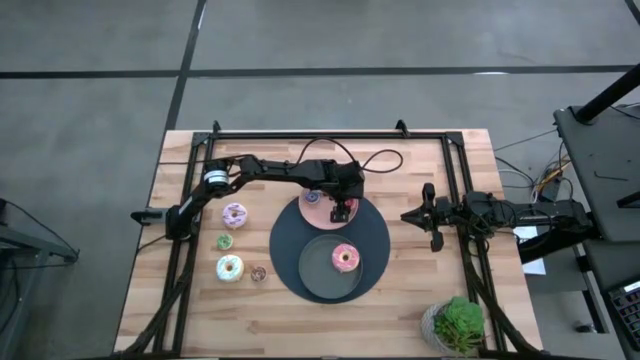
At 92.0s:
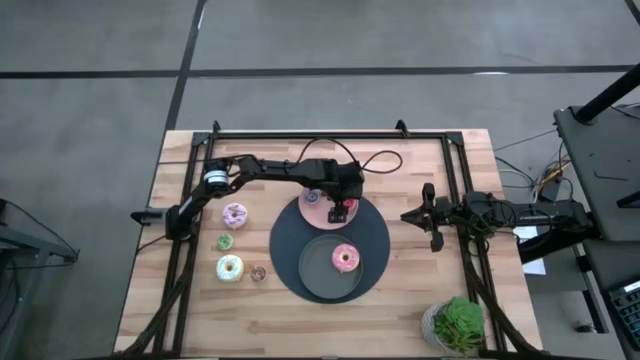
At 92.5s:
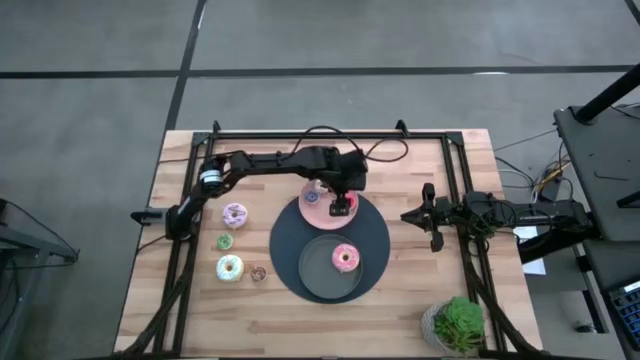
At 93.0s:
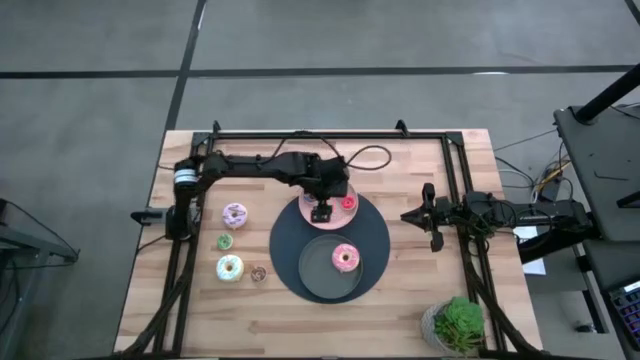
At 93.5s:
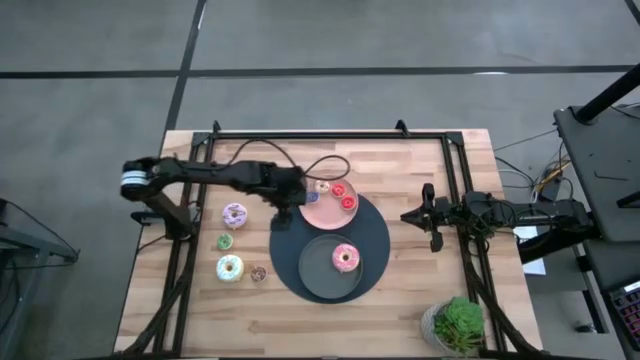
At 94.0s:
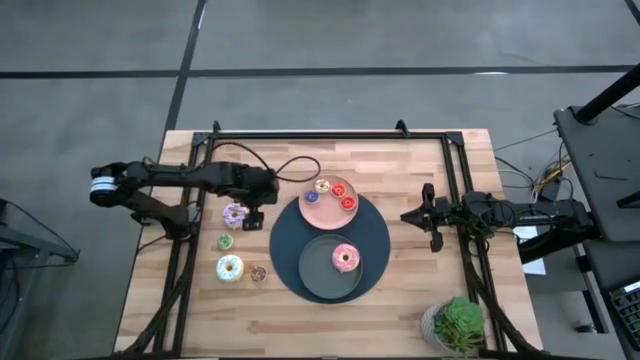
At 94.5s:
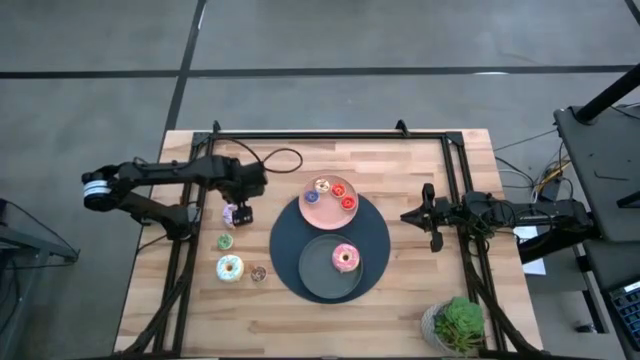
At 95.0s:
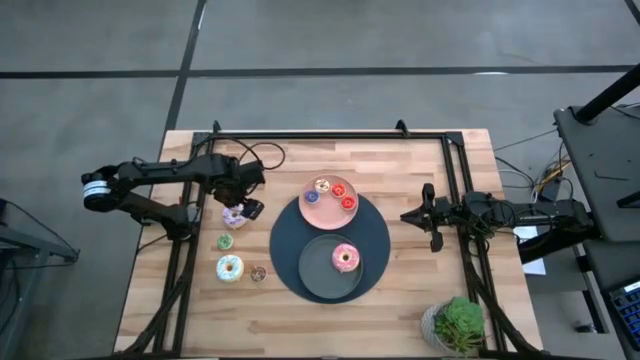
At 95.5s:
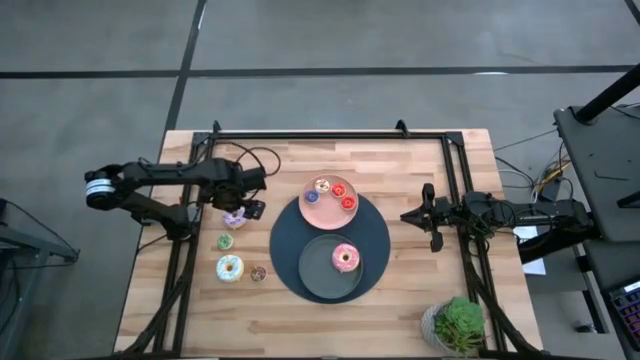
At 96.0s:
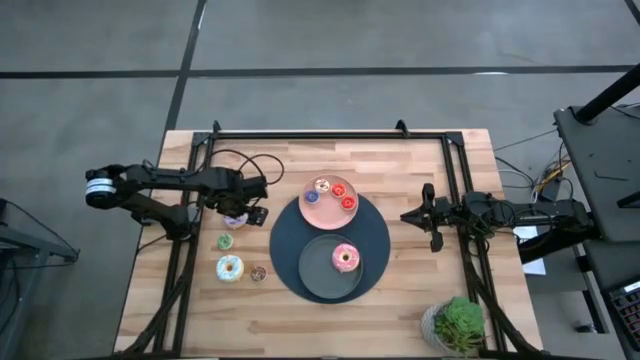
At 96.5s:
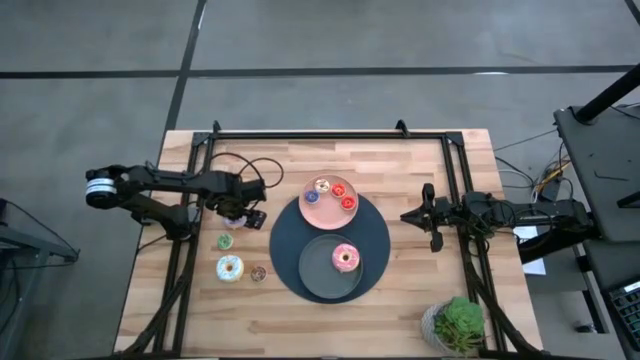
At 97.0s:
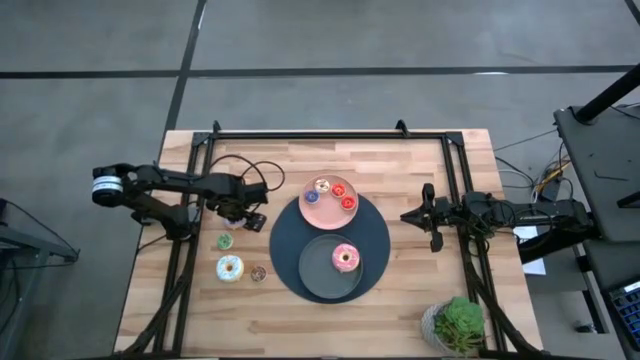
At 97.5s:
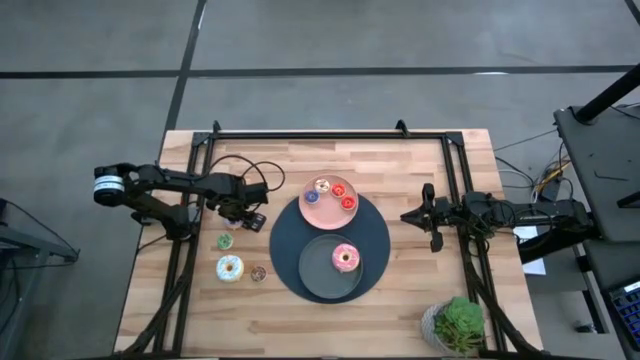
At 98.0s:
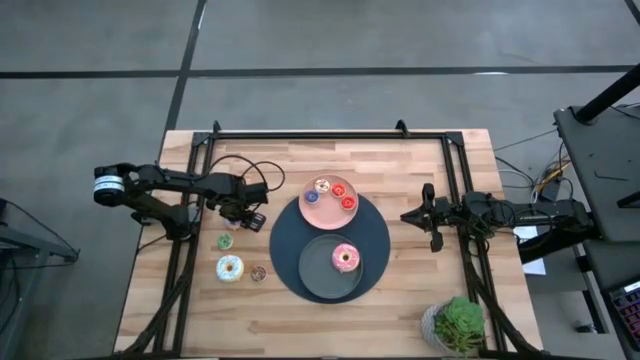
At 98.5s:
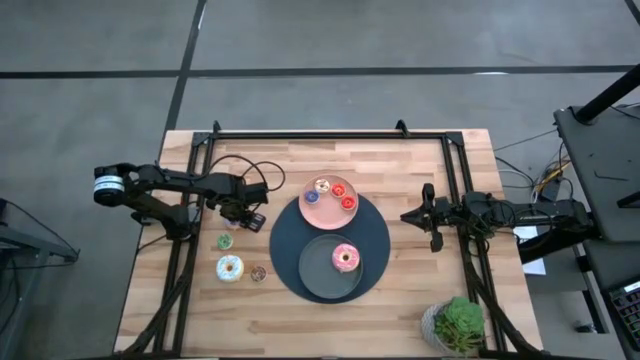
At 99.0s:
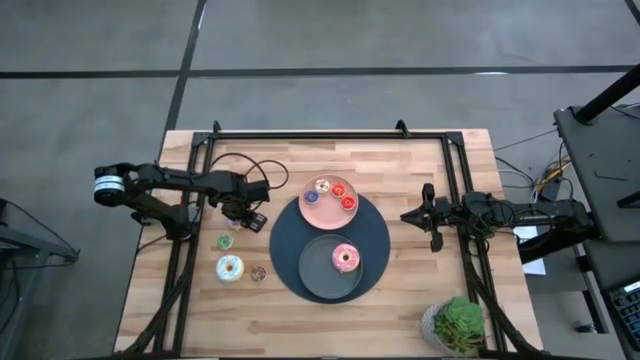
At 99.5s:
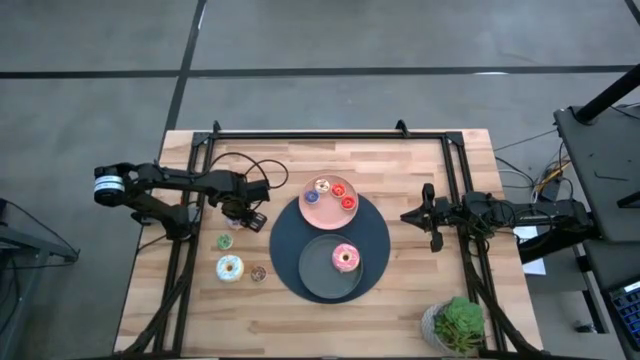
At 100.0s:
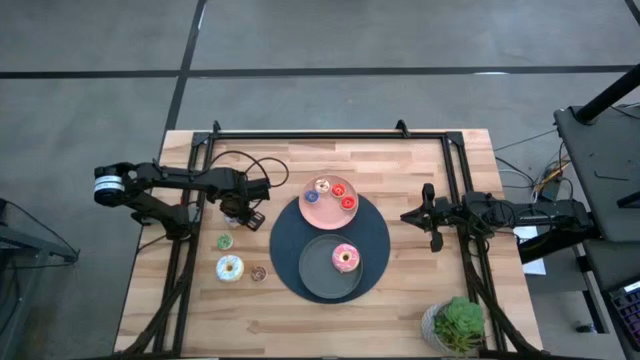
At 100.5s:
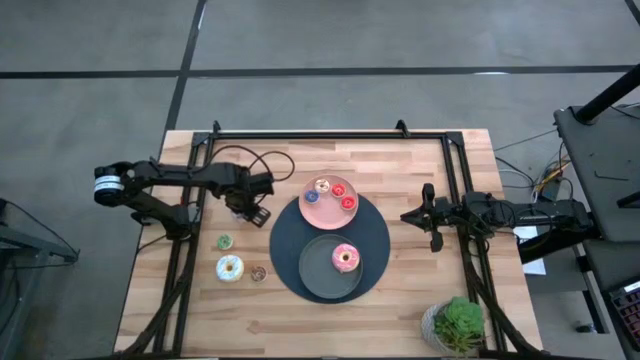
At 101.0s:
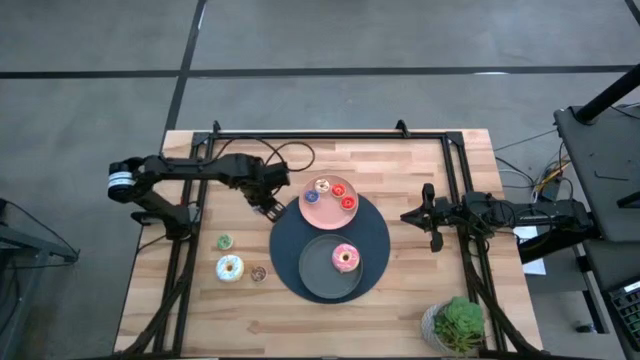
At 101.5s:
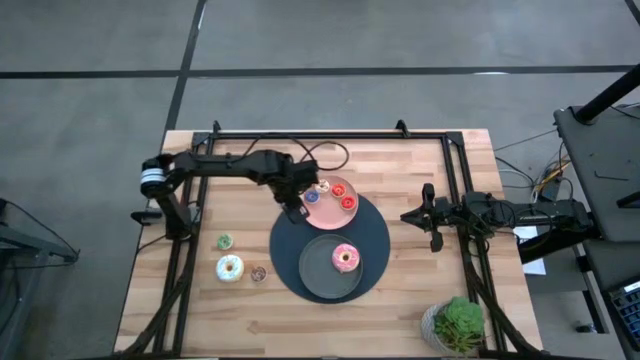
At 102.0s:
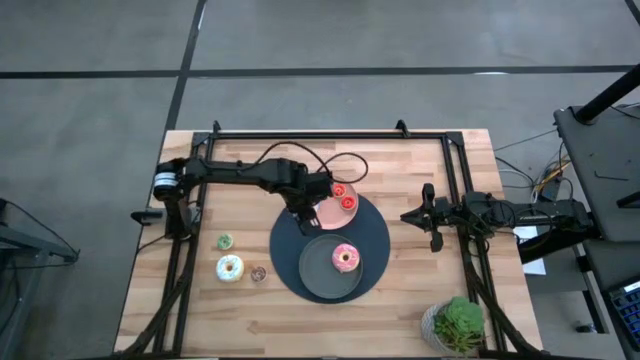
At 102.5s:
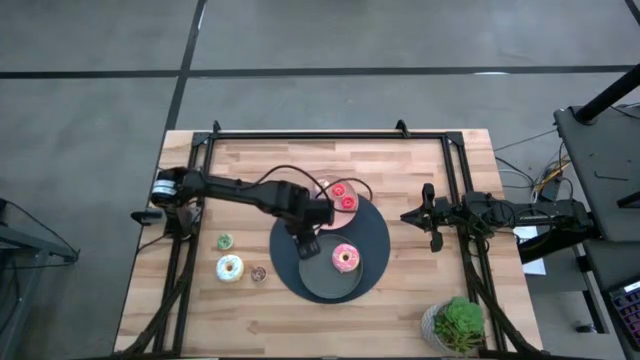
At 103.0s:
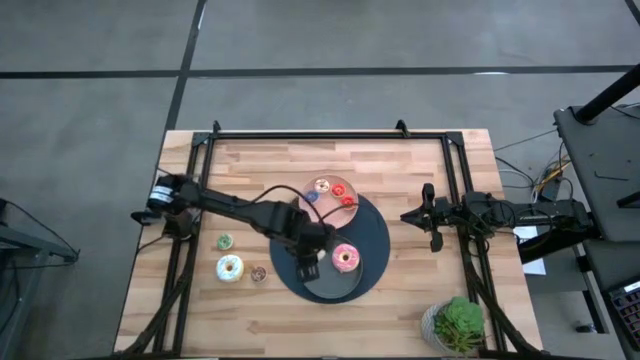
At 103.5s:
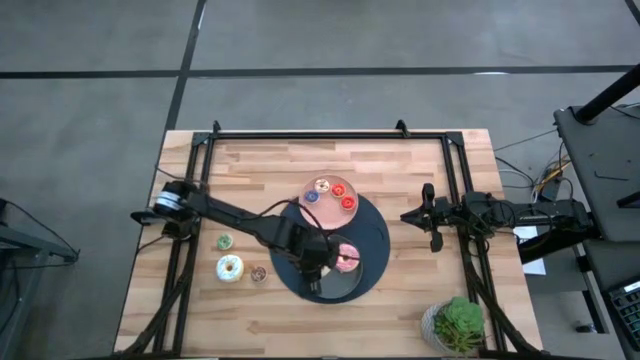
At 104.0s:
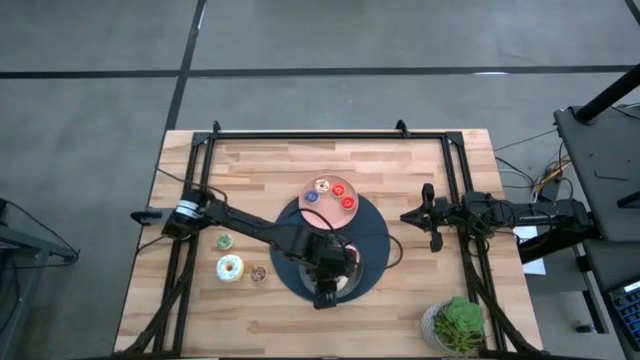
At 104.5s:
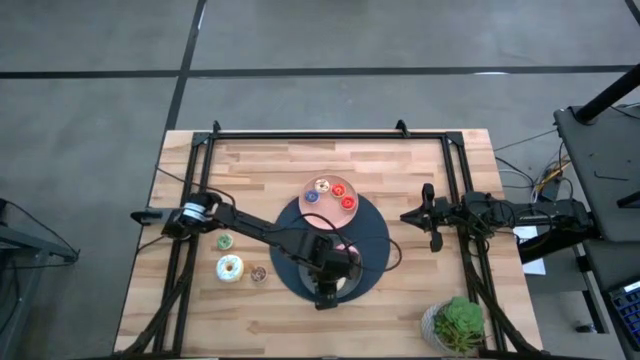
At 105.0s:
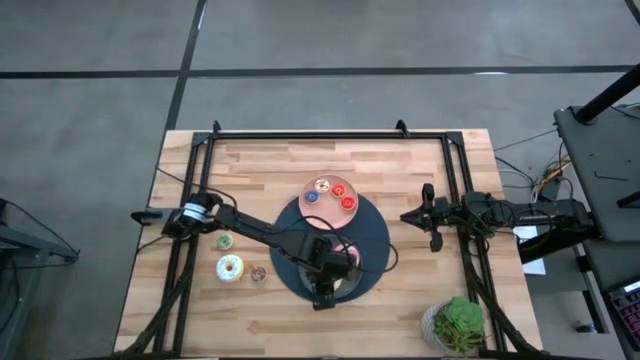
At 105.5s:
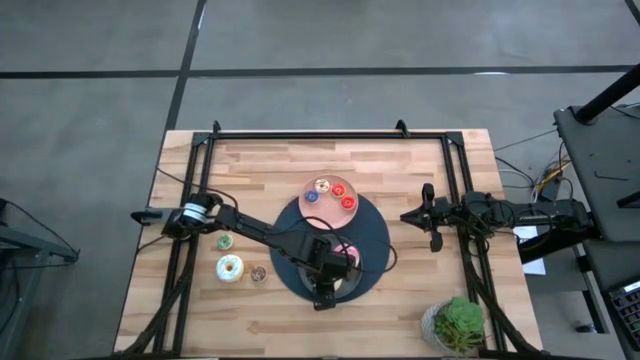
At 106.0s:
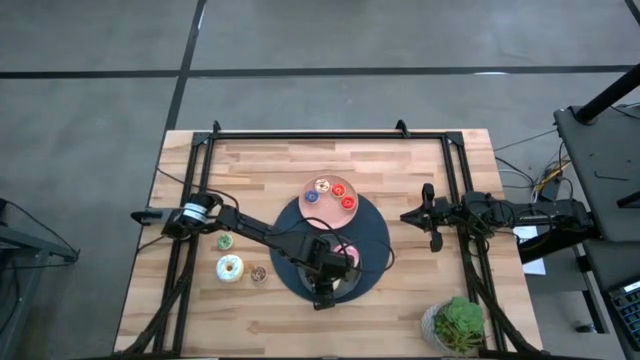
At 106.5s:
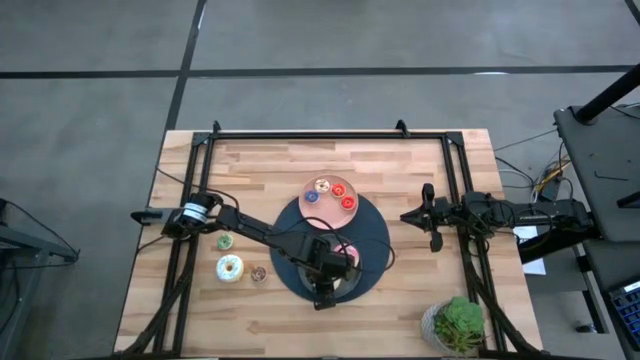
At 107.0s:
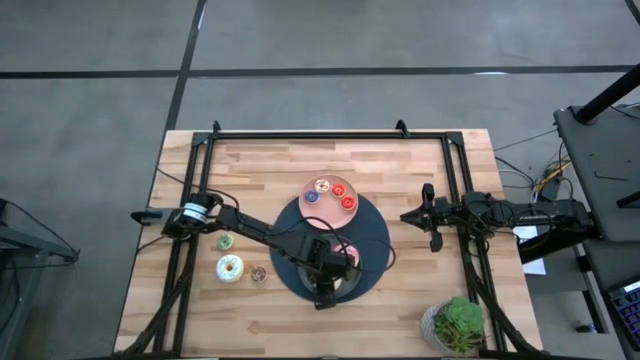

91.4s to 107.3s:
Task: Pick & Place donuts
Put the large purple donut on the gray plate
